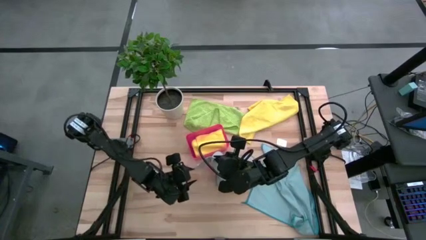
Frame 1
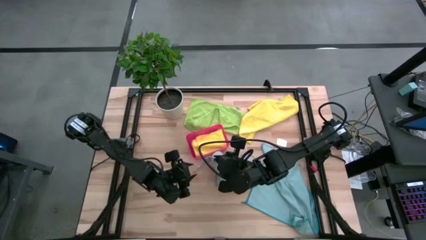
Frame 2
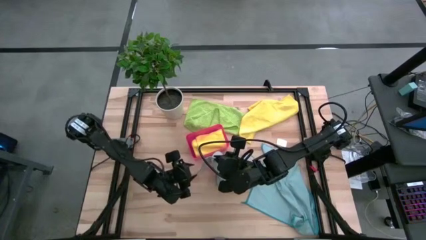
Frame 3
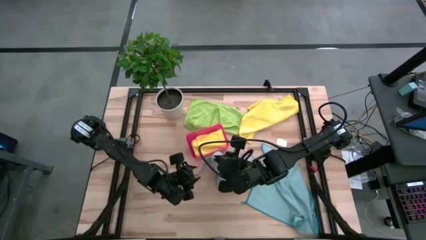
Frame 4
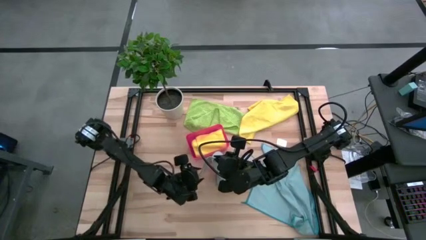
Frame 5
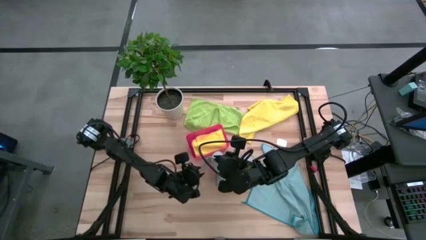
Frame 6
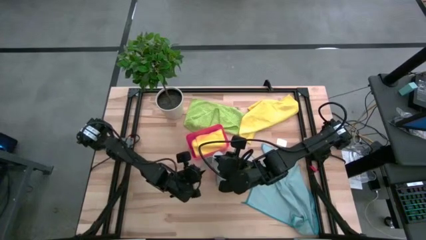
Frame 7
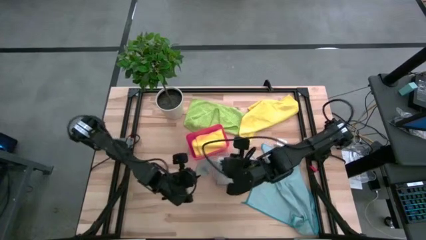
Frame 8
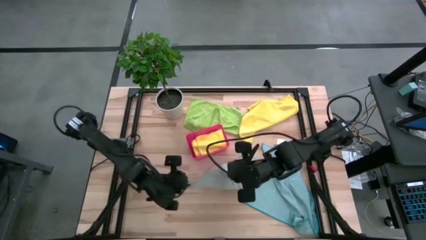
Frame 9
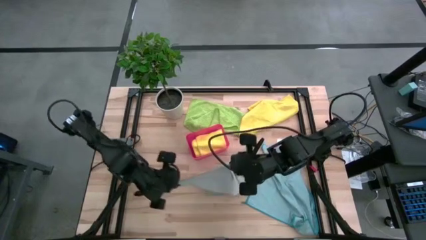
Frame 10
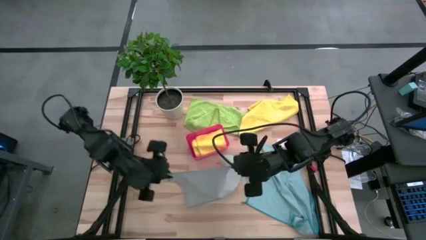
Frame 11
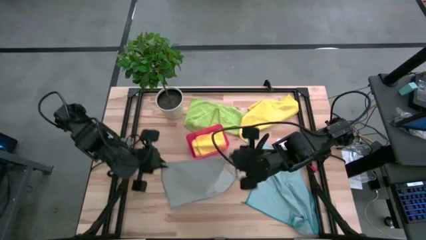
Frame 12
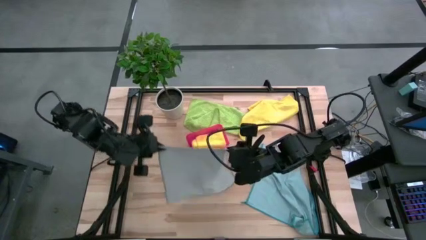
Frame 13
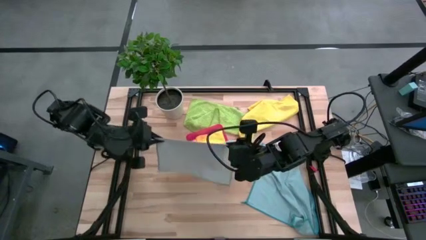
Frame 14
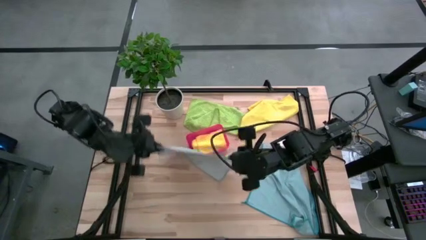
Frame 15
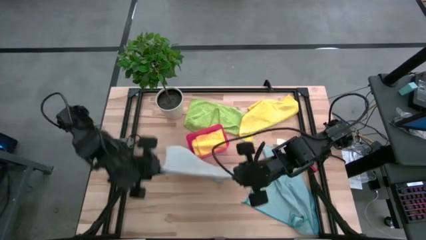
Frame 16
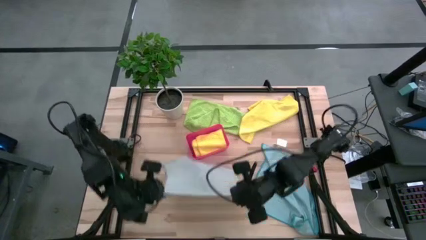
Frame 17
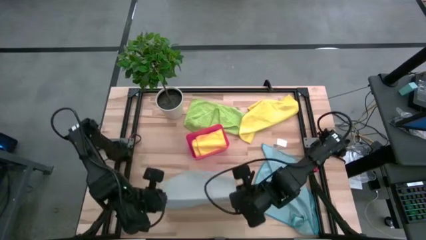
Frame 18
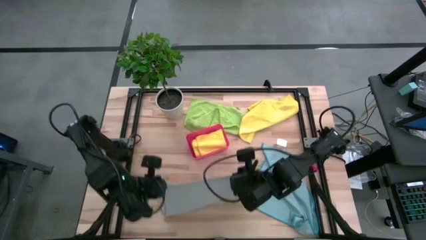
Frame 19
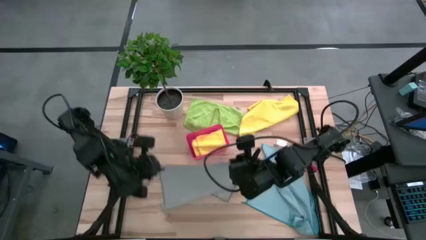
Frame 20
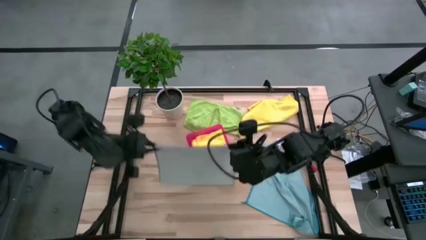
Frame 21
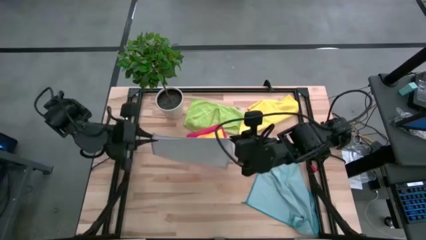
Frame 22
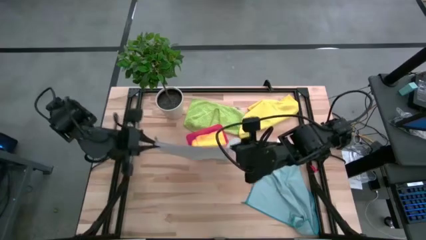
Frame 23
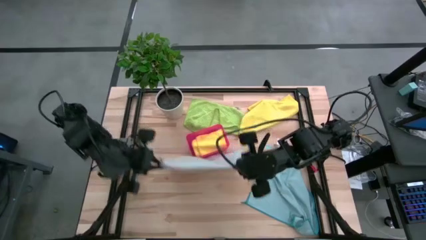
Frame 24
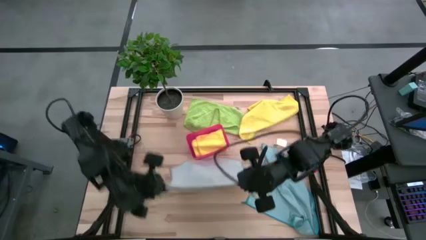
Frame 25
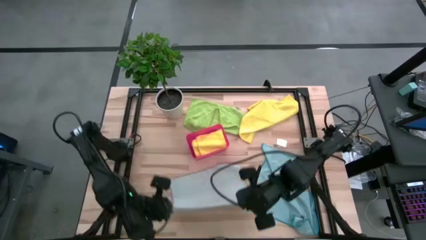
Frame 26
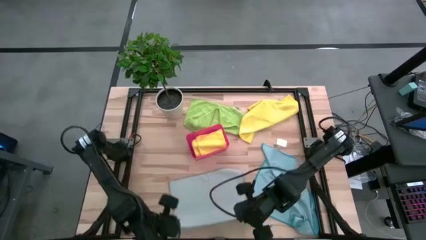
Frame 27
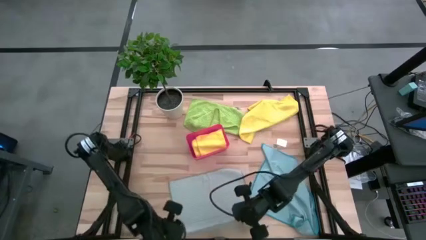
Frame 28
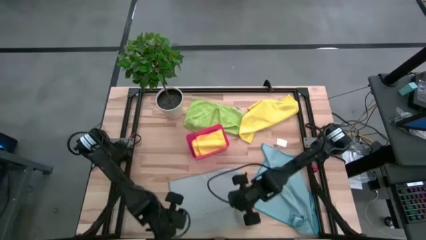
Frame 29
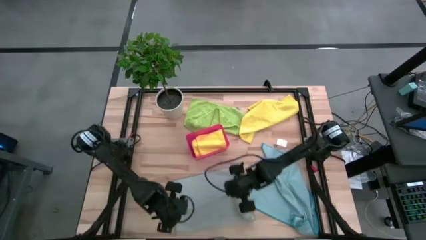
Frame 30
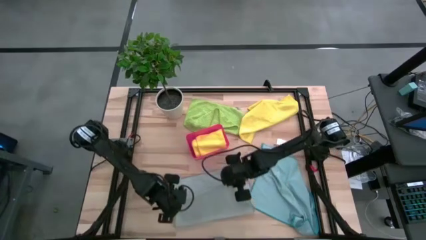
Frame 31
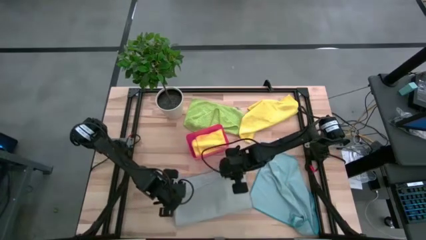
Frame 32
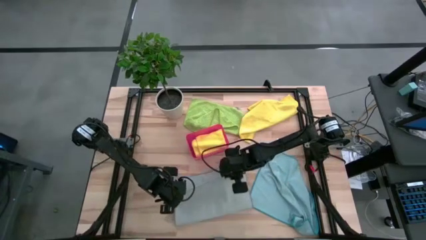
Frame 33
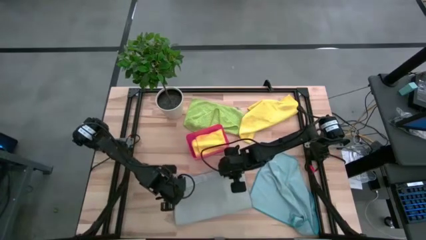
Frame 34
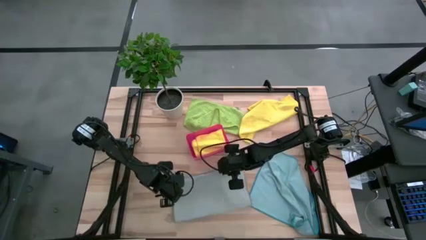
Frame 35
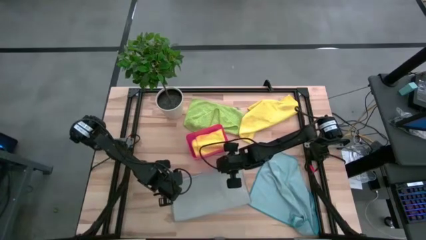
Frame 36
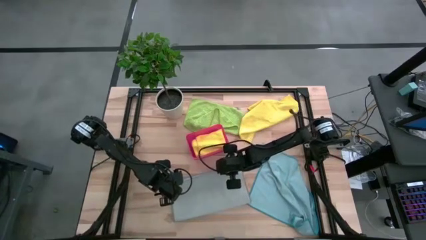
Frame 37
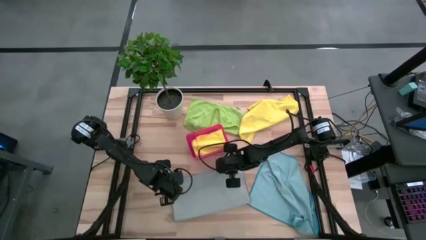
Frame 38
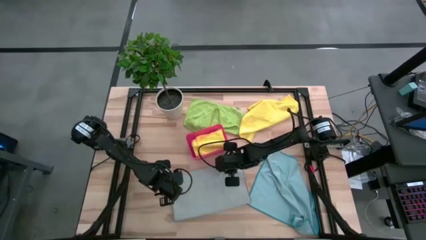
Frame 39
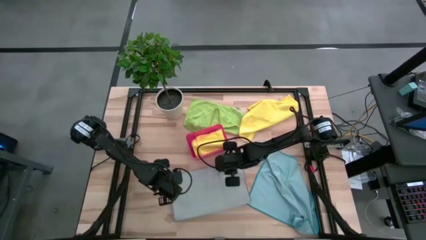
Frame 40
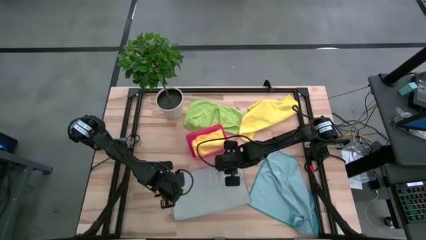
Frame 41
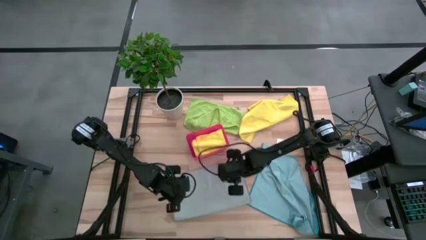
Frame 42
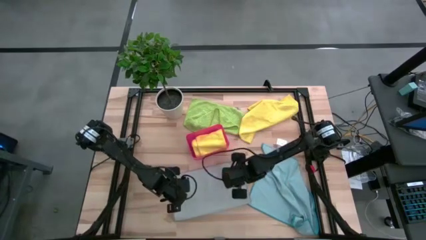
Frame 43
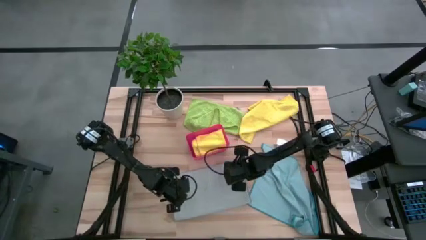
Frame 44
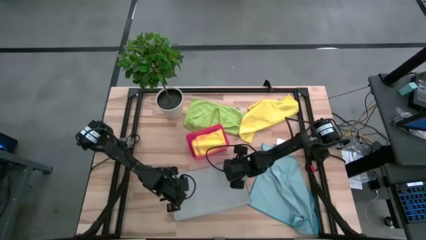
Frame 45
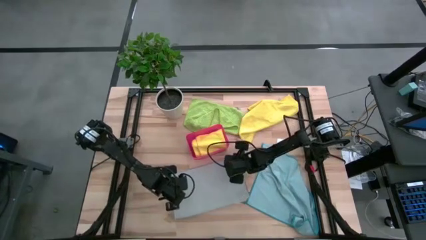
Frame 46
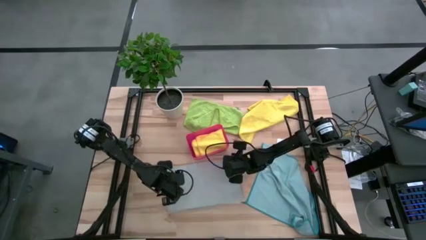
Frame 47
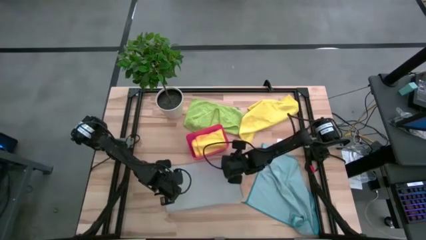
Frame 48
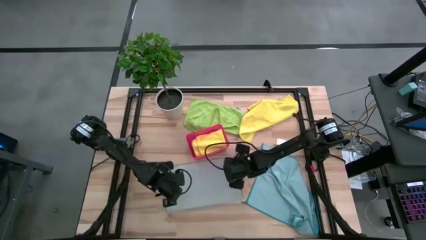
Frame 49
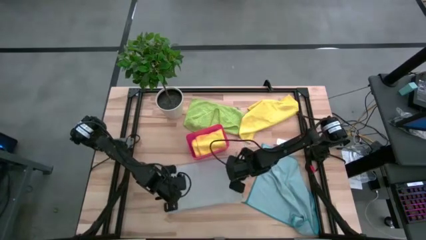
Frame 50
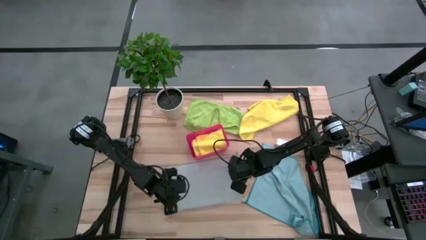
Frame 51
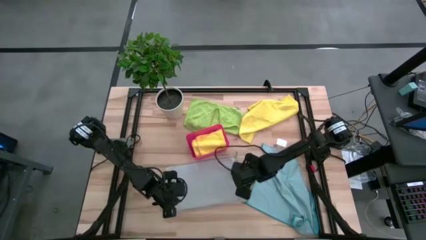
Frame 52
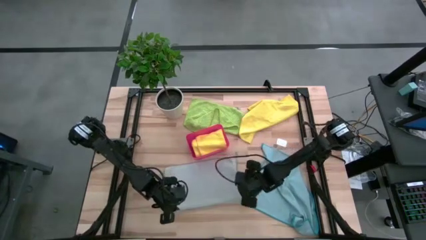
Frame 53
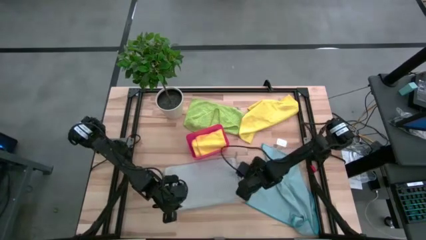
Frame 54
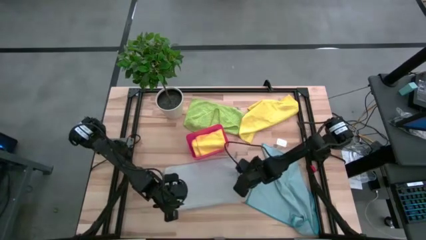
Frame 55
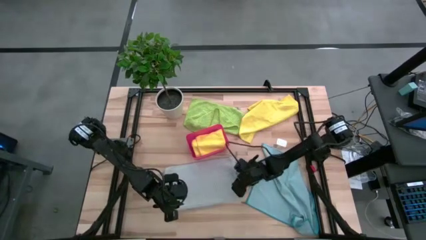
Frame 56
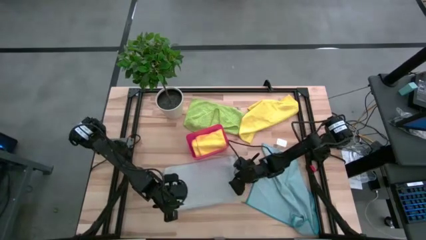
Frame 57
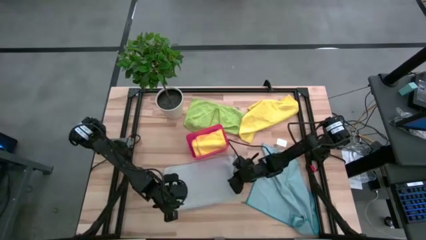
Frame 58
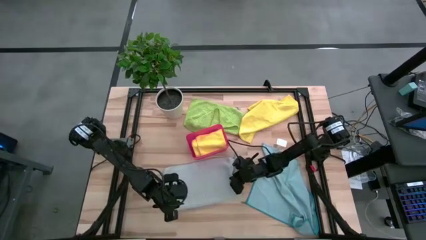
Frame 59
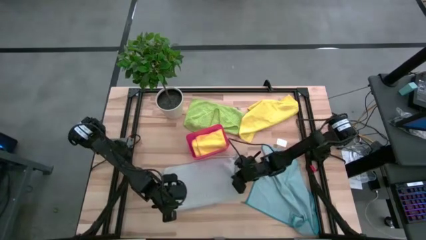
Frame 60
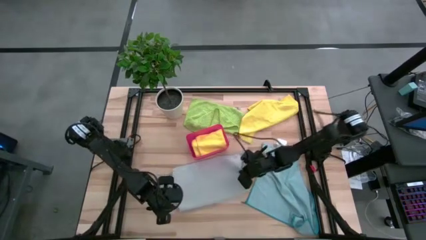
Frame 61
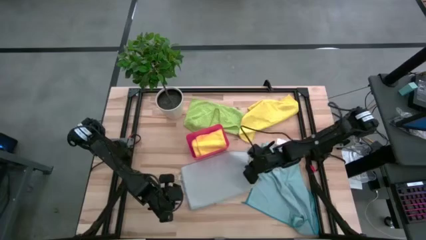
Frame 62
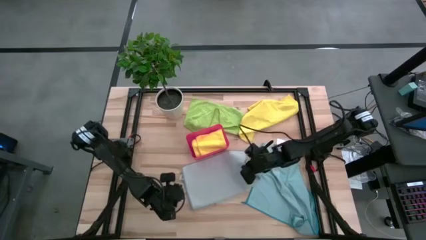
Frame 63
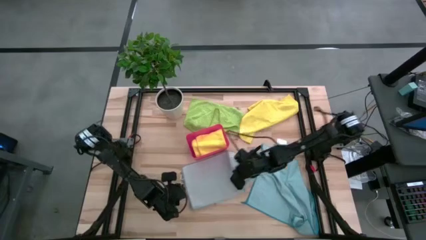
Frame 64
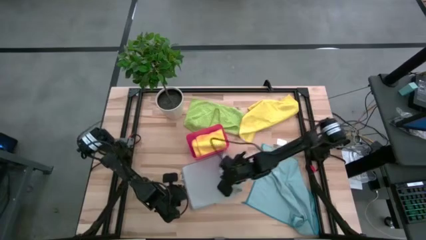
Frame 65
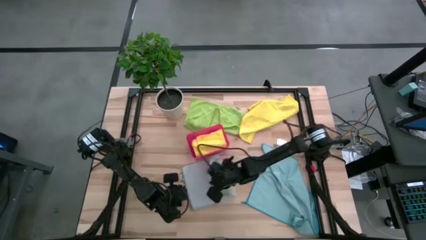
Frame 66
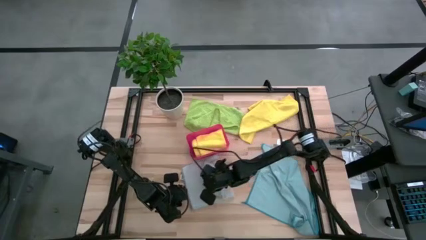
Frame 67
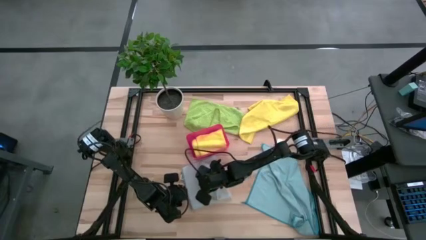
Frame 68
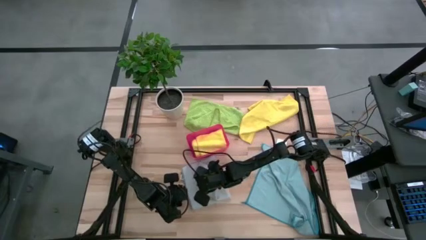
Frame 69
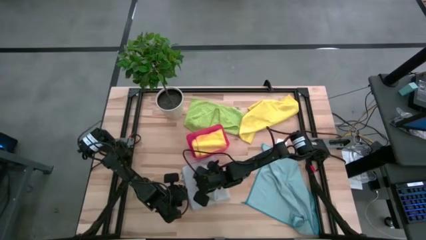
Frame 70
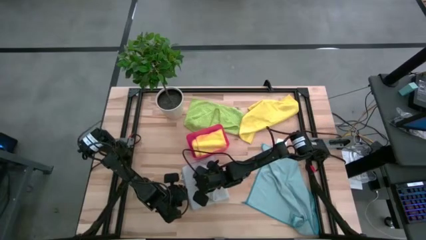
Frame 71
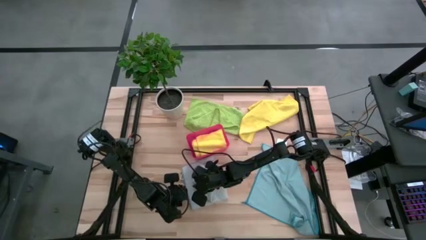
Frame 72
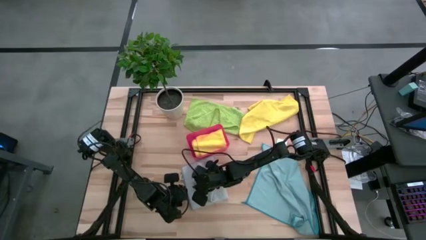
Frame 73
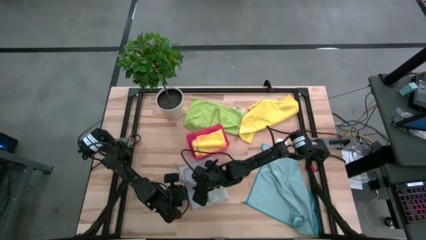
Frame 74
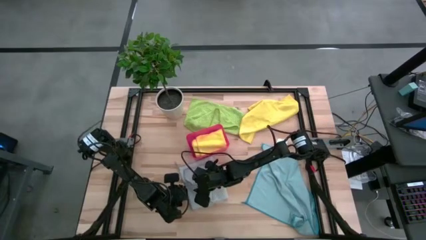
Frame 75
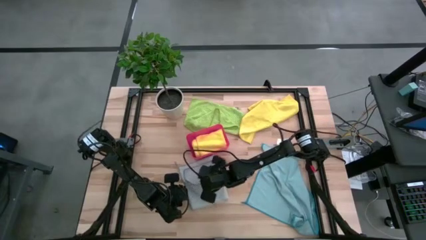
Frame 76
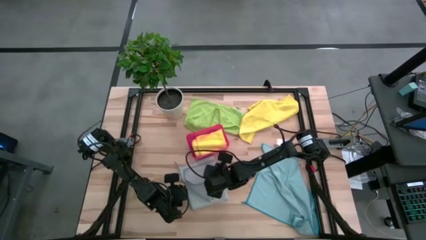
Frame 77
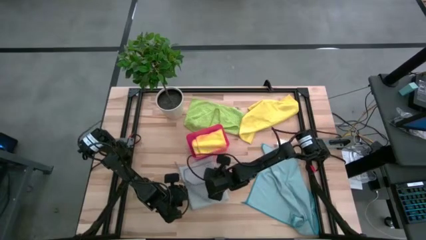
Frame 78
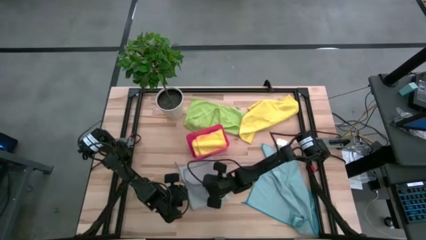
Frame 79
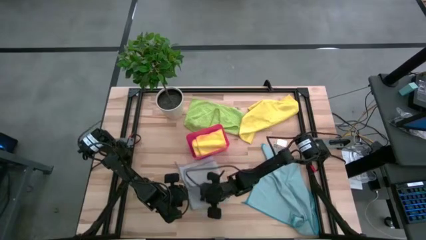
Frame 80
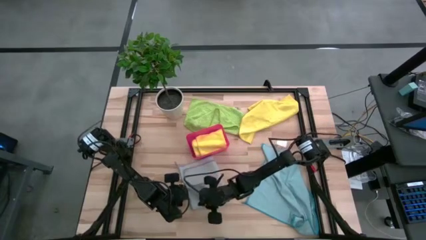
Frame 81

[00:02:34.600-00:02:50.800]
Task: Fold microfiber towels
Fold the gray microfiber cloth
